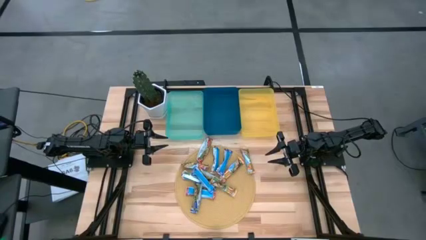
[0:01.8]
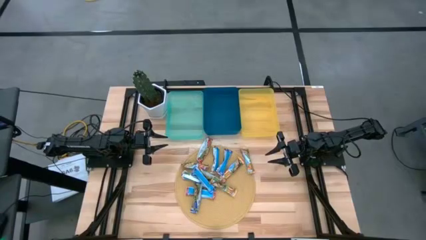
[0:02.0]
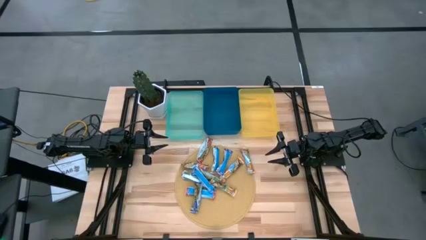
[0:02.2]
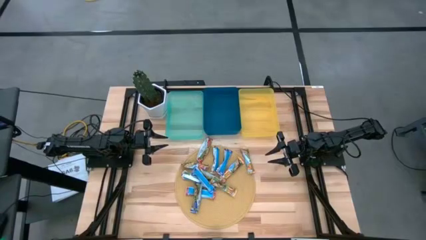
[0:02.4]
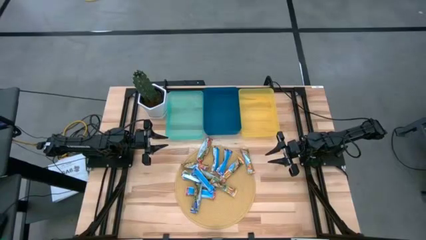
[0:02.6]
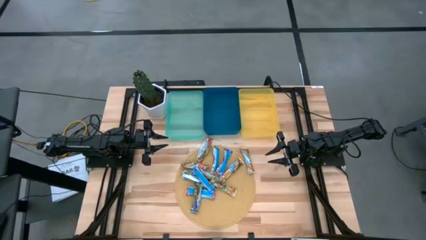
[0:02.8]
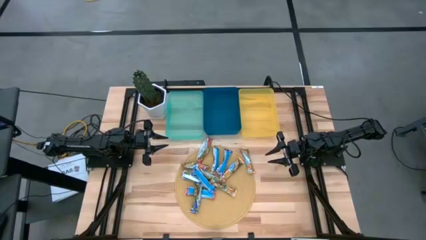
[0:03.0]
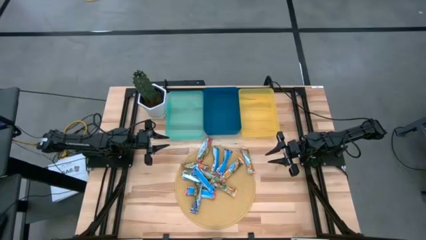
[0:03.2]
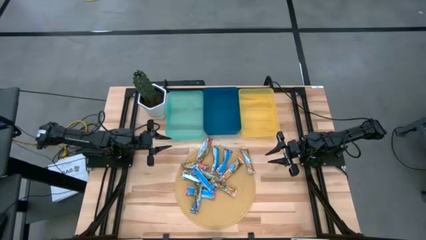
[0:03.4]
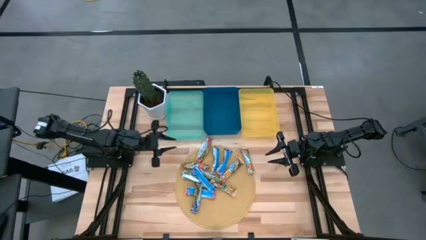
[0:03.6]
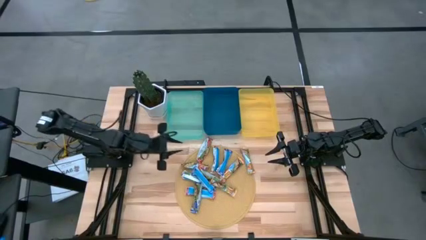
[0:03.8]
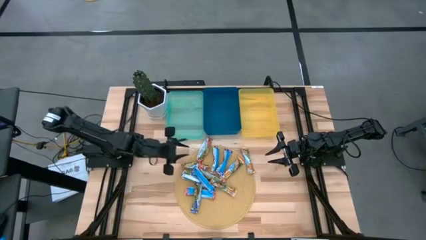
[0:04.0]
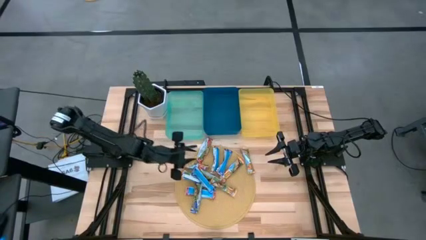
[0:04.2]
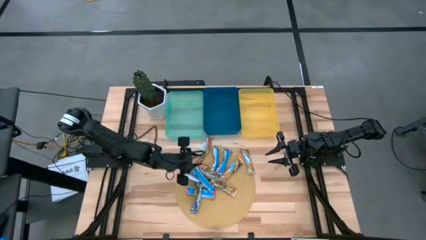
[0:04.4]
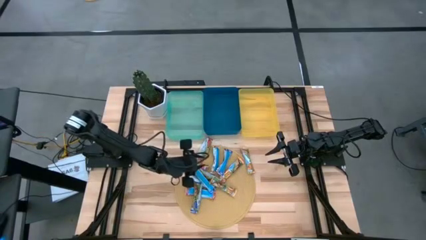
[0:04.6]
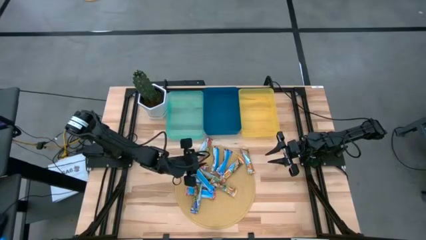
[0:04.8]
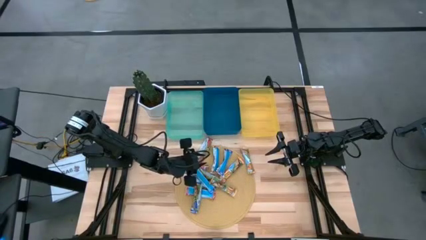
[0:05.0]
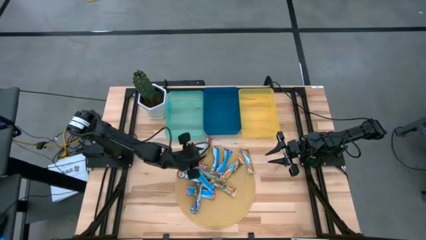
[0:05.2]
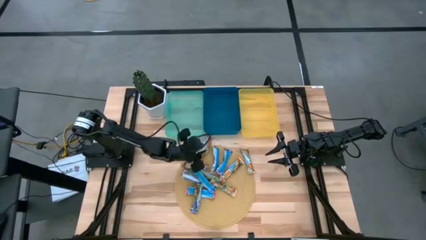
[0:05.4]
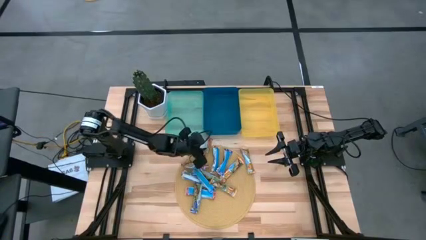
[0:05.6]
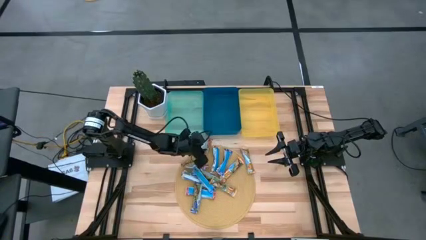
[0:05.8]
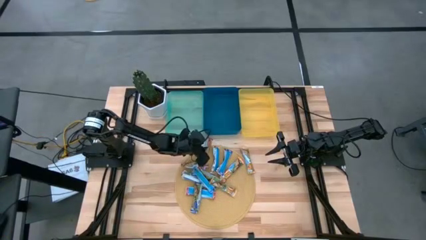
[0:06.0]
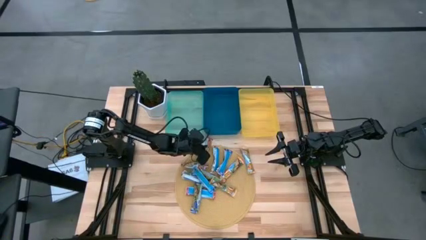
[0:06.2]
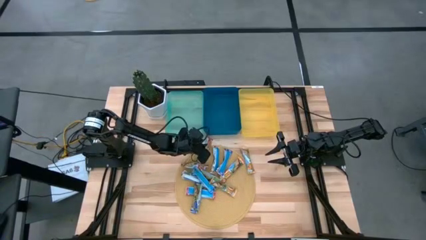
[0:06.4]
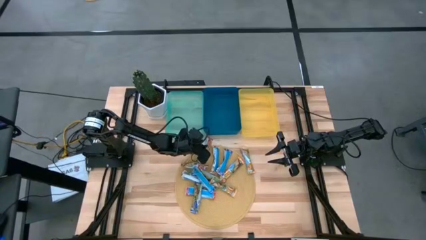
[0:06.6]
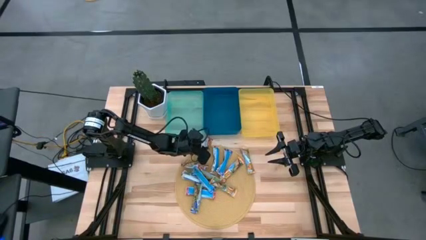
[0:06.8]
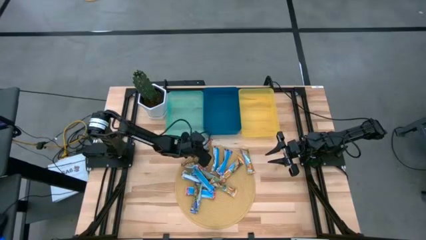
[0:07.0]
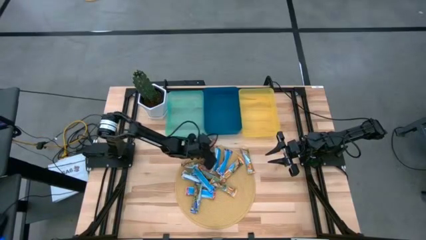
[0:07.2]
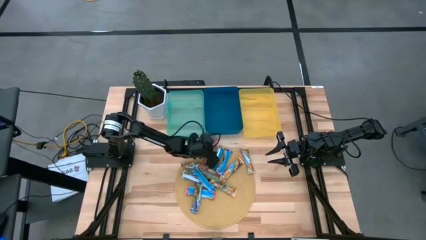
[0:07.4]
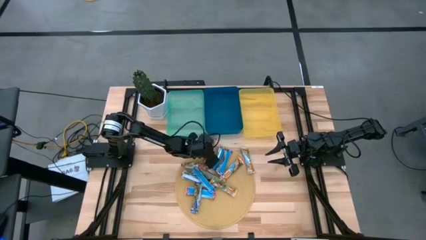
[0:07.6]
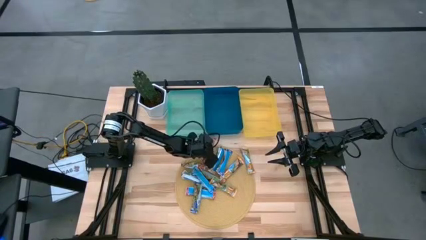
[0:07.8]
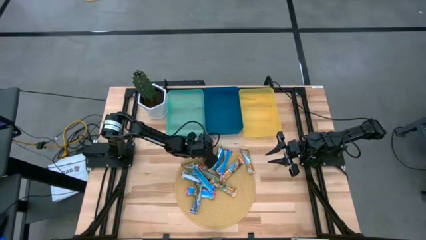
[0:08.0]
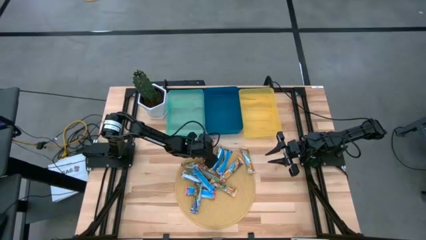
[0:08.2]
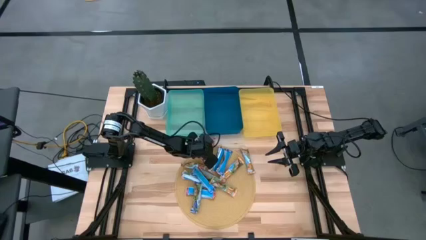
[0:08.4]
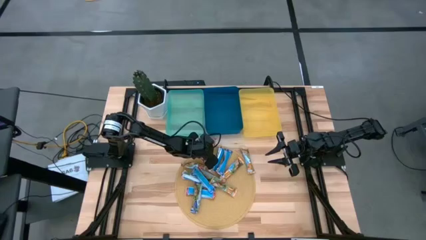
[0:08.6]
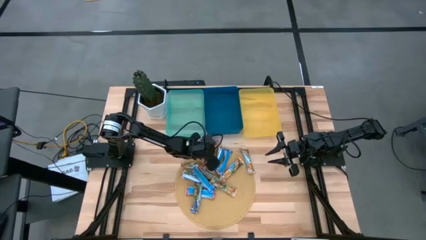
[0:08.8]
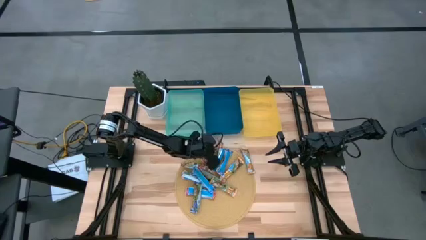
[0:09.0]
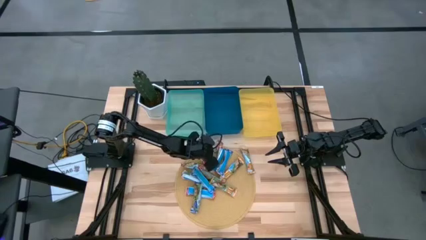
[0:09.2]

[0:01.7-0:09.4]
Task: Pick and place Granola Bars by type
Put the red granola bar into the green bin

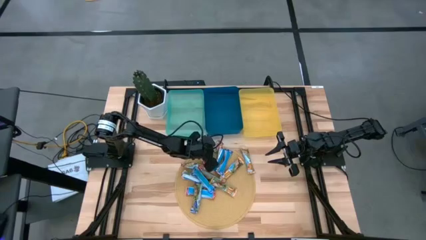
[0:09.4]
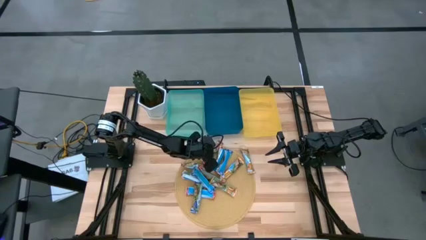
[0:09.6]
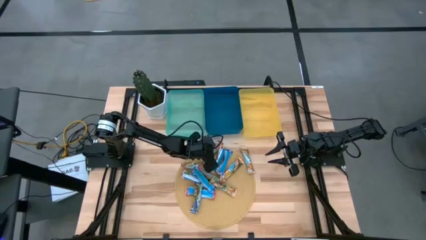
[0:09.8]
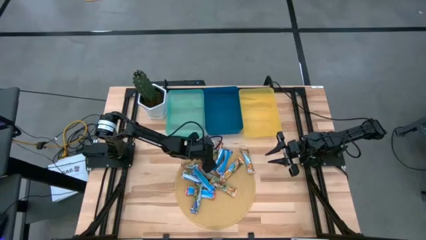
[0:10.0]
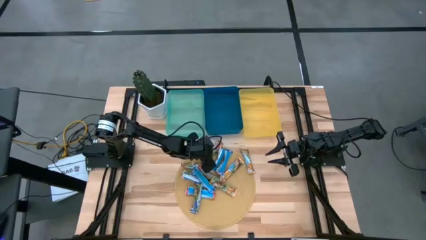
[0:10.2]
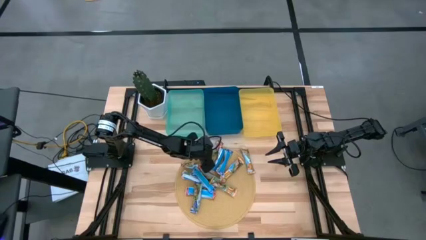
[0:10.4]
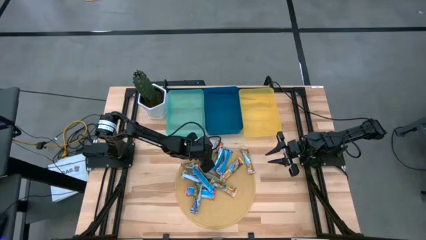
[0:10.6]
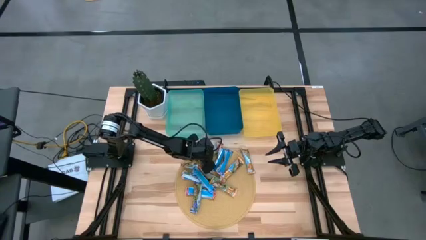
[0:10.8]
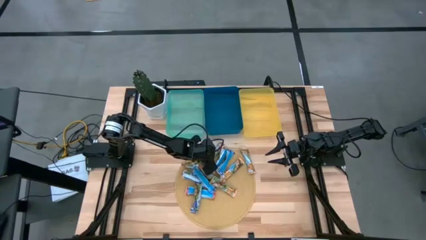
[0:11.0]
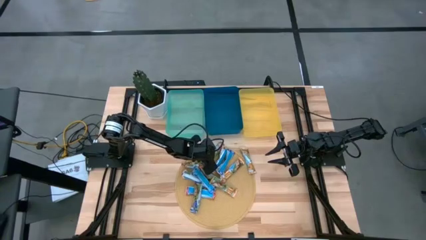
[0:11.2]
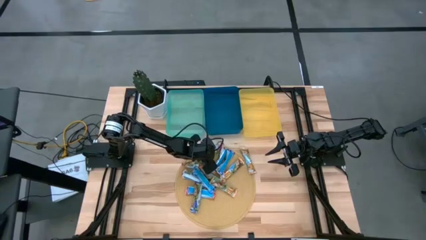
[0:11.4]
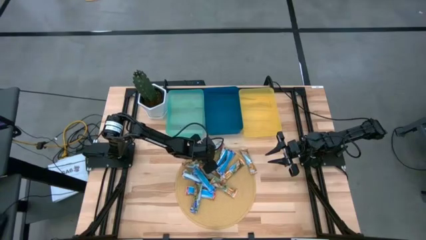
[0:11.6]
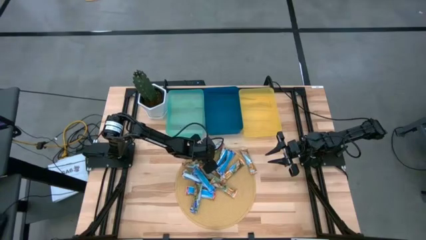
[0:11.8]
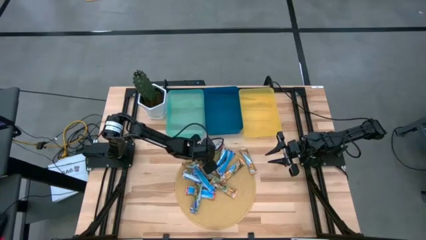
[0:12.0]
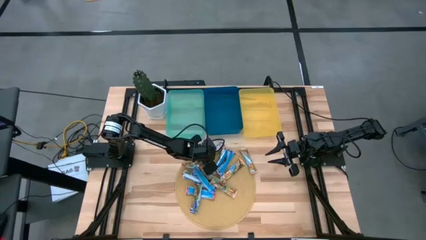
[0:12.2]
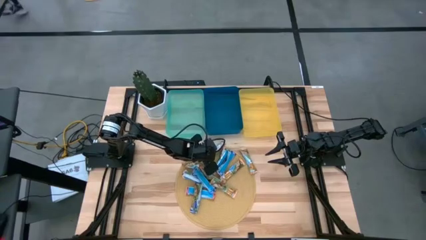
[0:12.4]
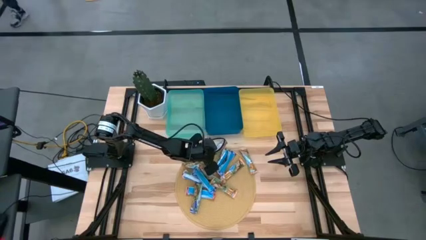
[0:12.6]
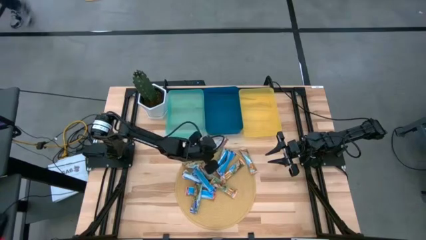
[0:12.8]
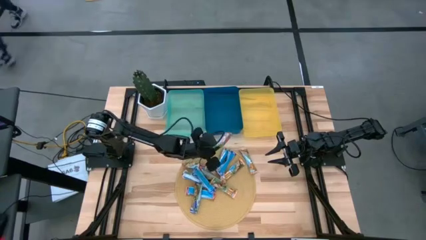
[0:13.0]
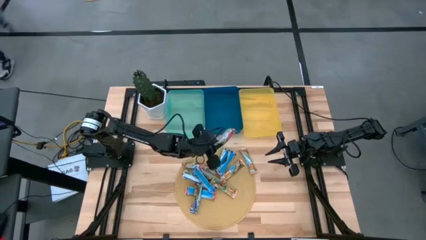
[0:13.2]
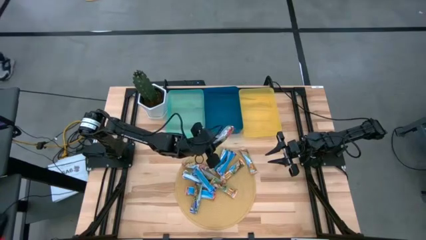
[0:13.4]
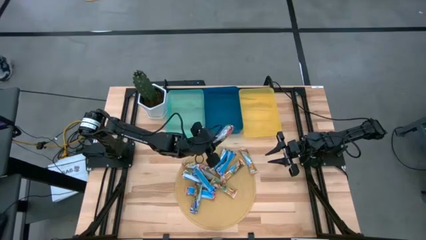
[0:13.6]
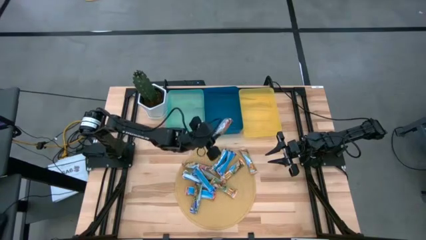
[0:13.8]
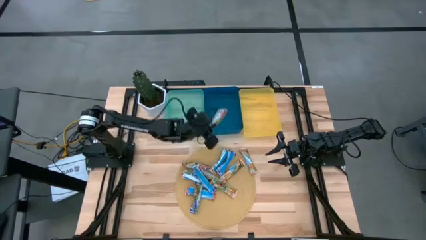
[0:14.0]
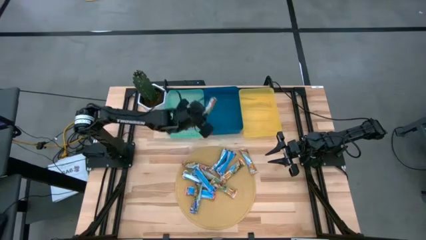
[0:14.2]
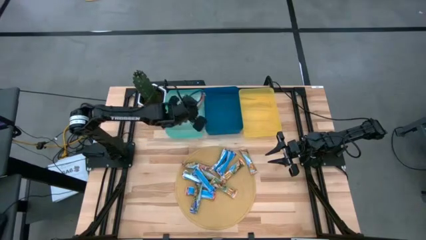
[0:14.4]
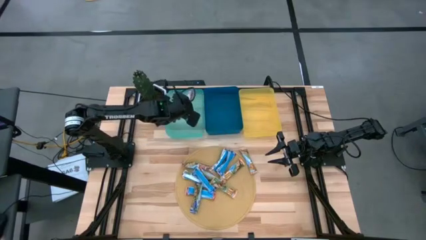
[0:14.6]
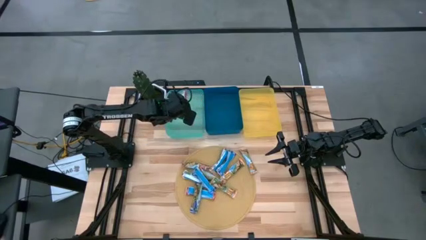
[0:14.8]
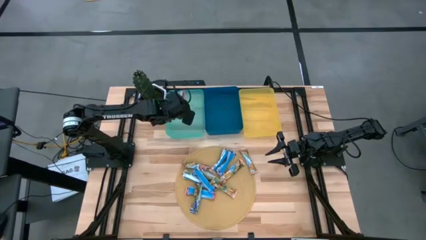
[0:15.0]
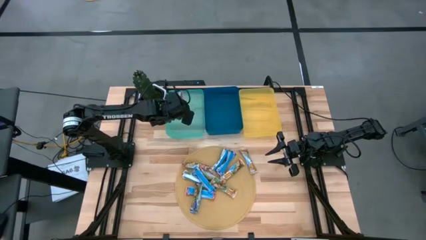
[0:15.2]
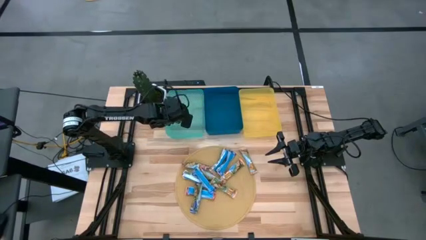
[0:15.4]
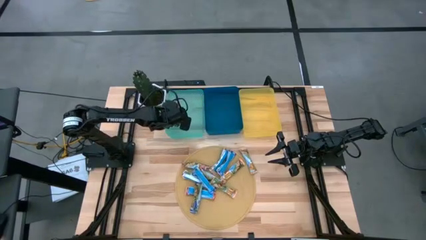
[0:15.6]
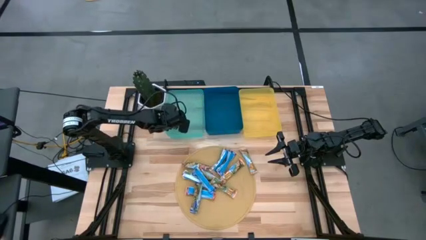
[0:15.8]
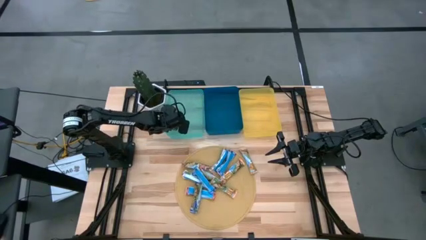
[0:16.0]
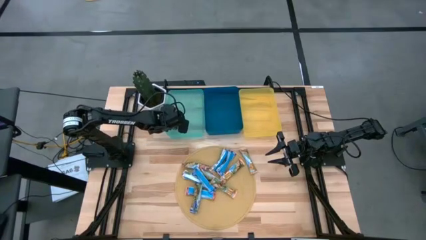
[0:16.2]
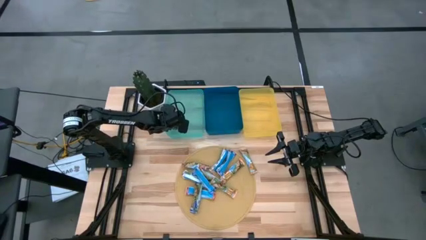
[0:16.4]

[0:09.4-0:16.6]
Put the red granola bar into the green bin

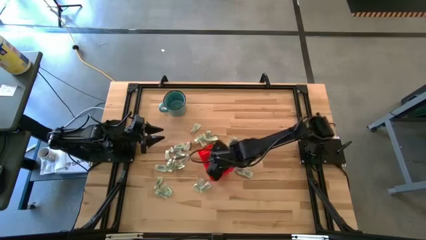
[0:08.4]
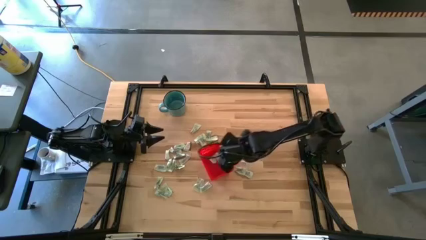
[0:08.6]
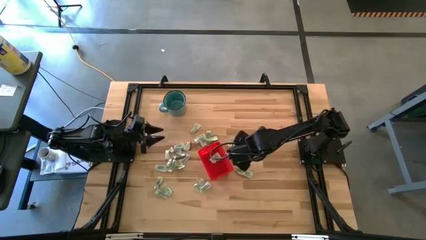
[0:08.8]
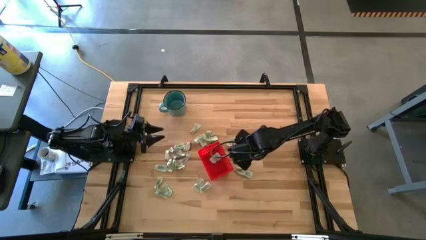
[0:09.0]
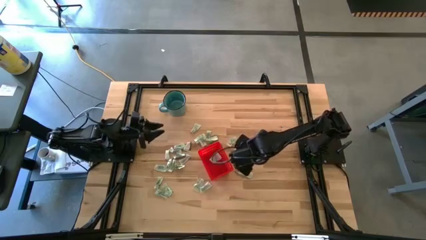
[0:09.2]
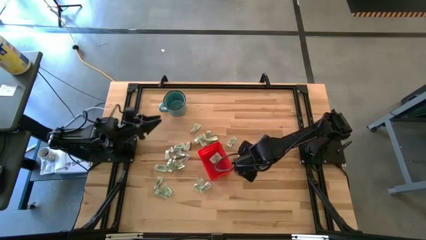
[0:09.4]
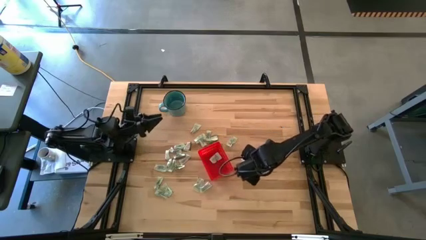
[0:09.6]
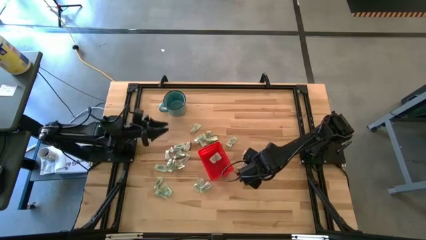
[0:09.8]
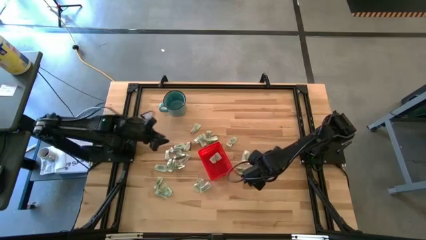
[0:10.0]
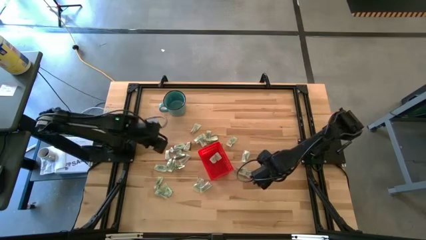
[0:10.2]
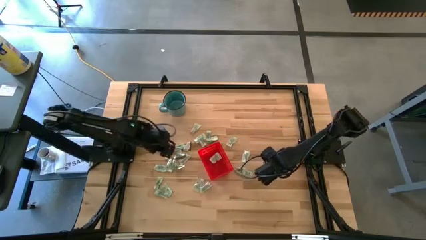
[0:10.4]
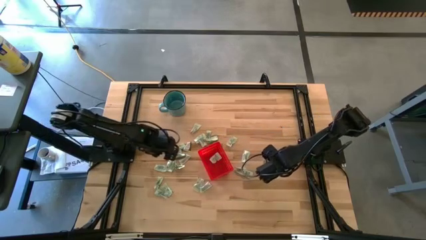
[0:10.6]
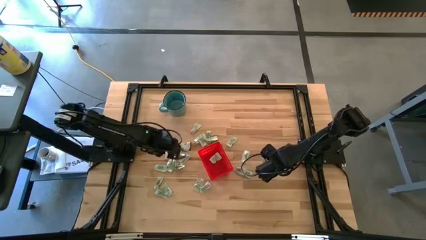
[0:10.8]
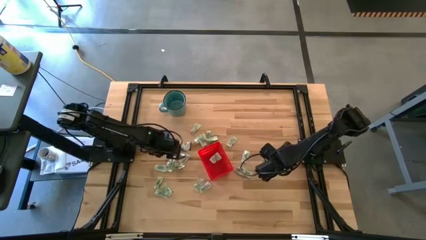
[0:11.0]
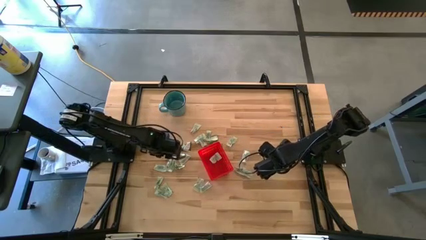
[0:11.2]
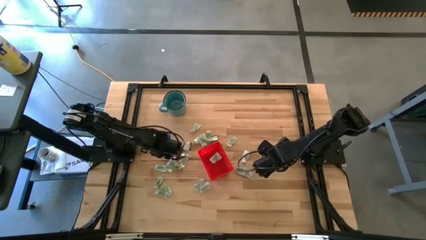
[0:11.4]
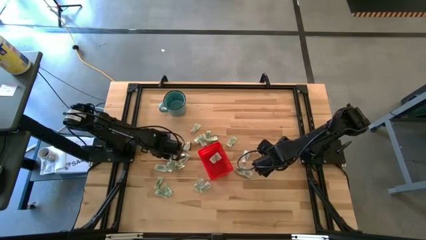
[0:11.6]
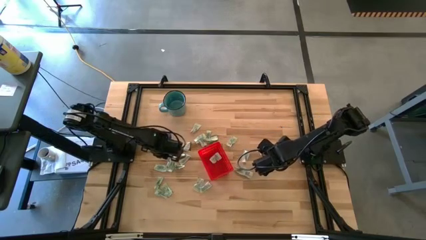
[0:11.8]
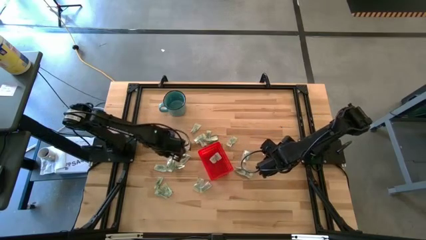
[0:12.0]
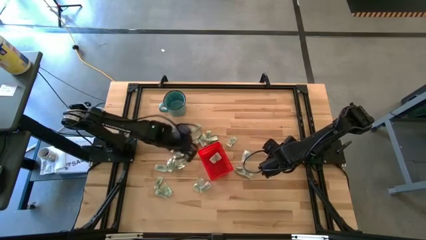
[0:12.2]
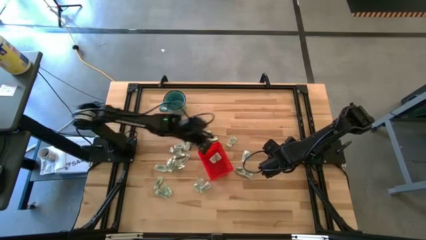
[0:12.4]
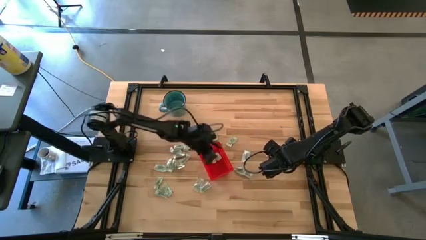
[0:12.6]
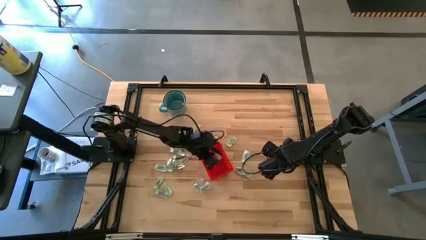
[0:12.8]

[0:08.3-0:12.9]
Task: Pick and place Stevia / Truvia into bins
Put the green stevia packet into the basket
